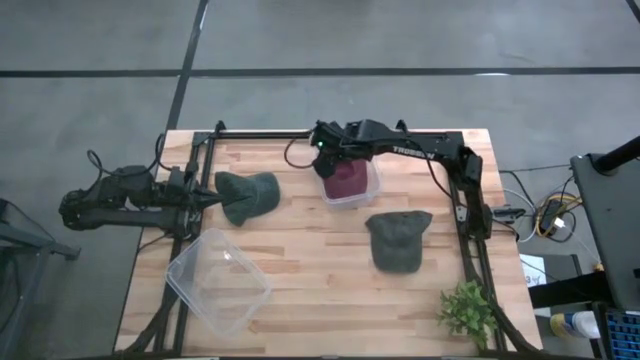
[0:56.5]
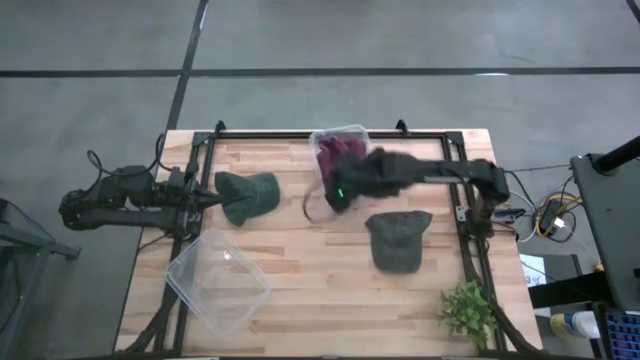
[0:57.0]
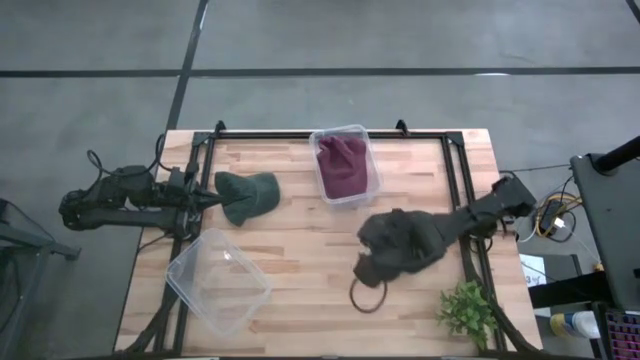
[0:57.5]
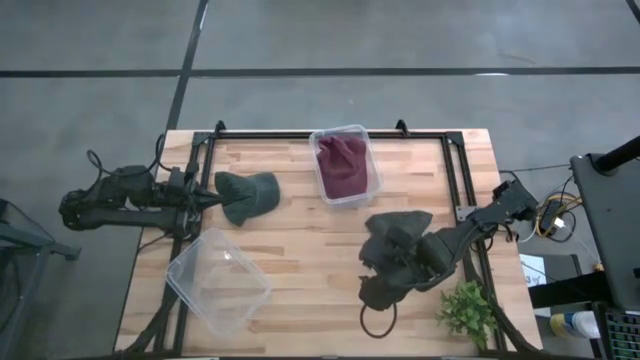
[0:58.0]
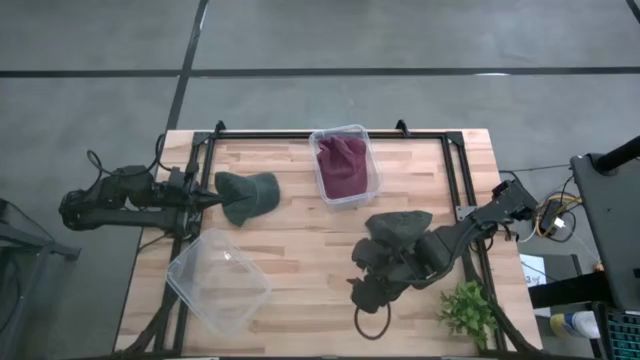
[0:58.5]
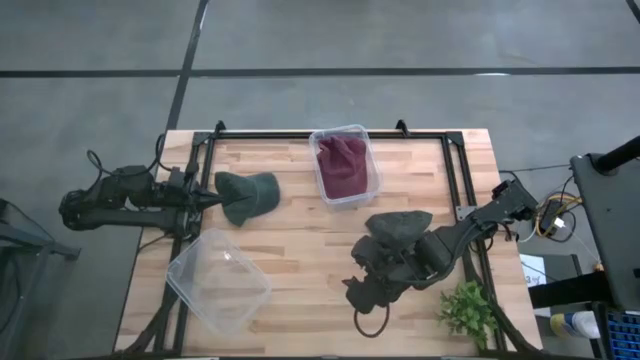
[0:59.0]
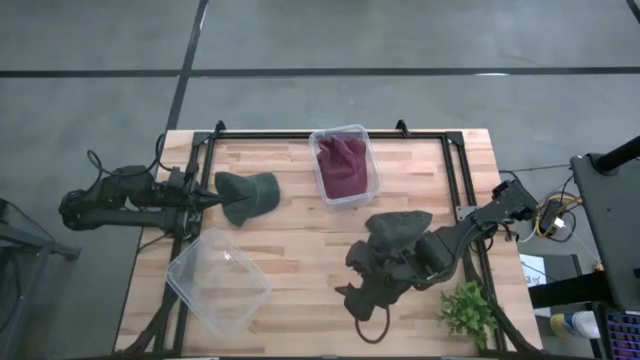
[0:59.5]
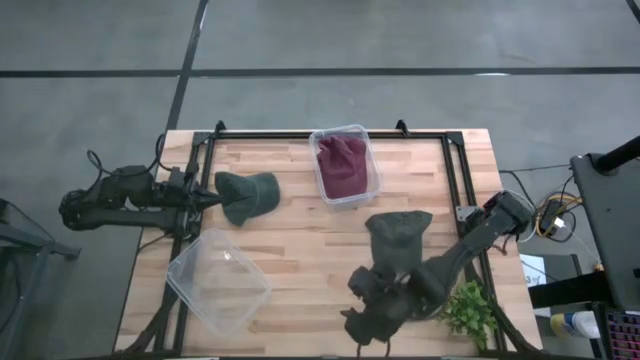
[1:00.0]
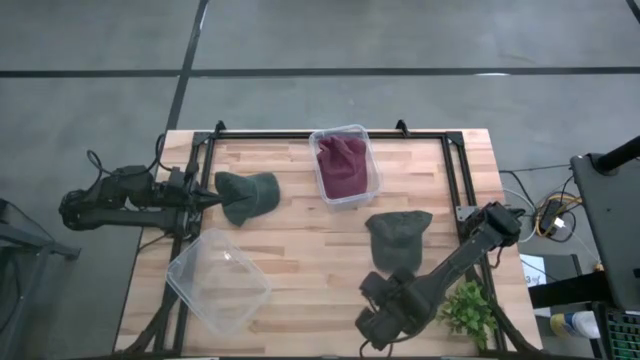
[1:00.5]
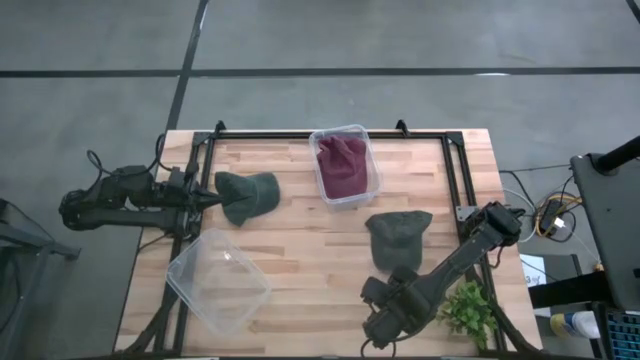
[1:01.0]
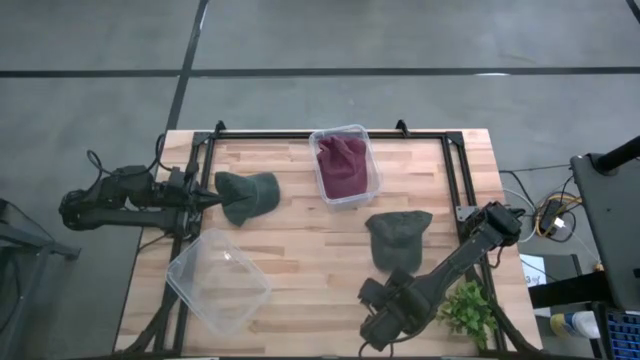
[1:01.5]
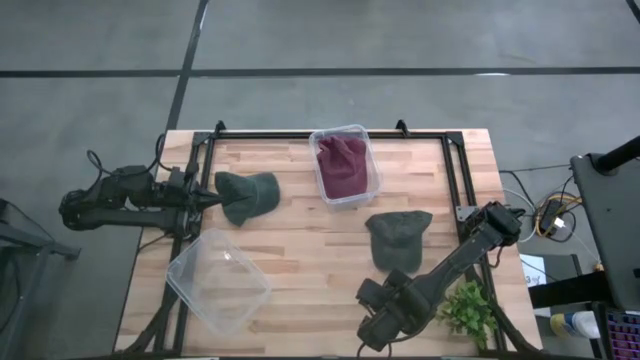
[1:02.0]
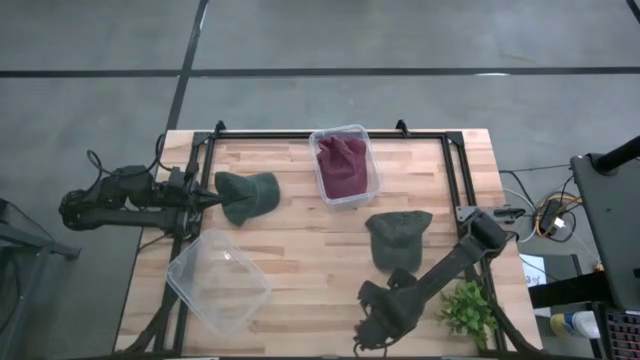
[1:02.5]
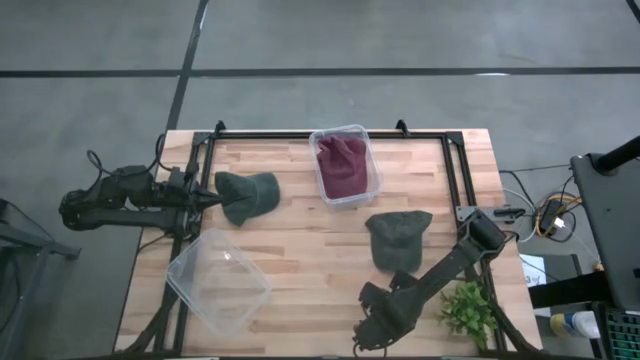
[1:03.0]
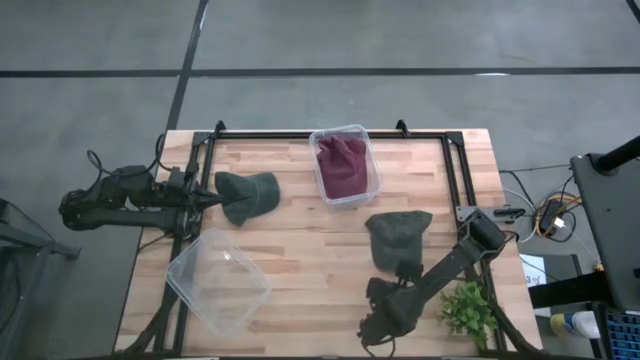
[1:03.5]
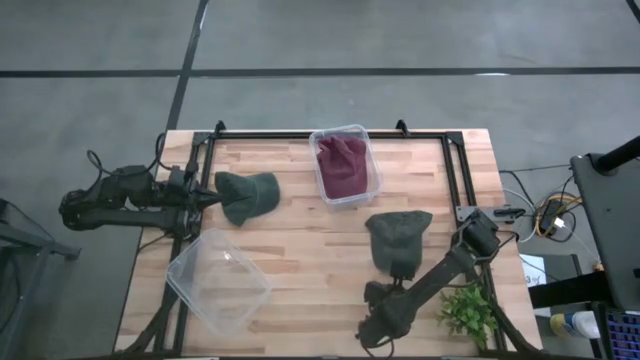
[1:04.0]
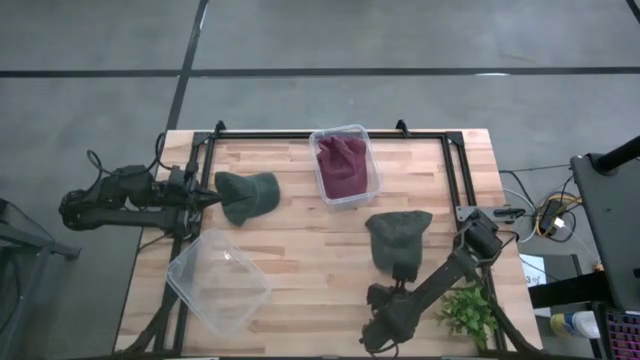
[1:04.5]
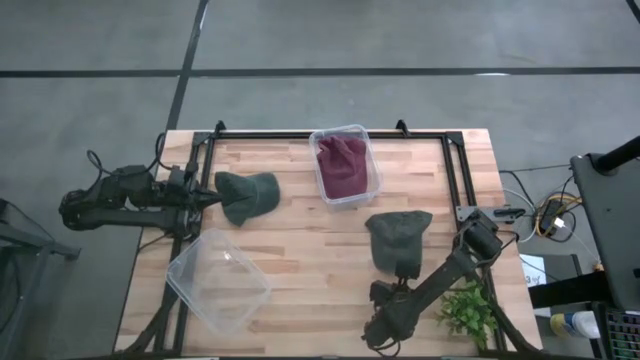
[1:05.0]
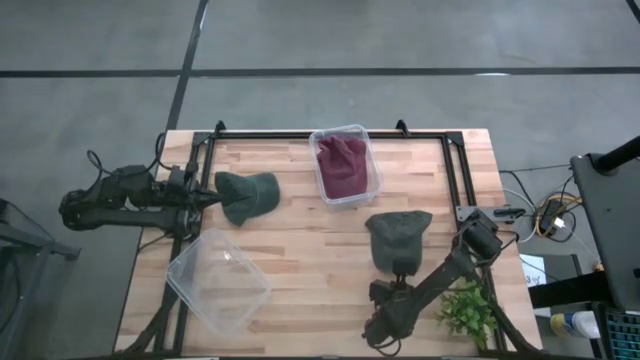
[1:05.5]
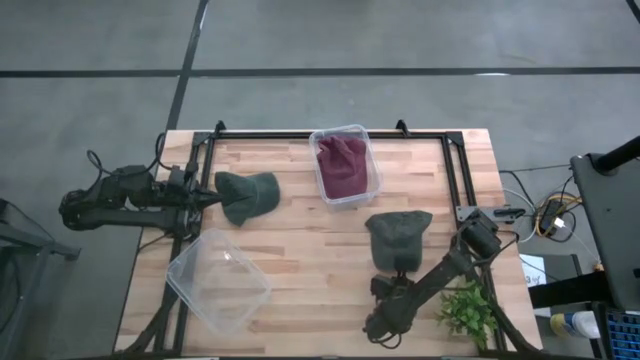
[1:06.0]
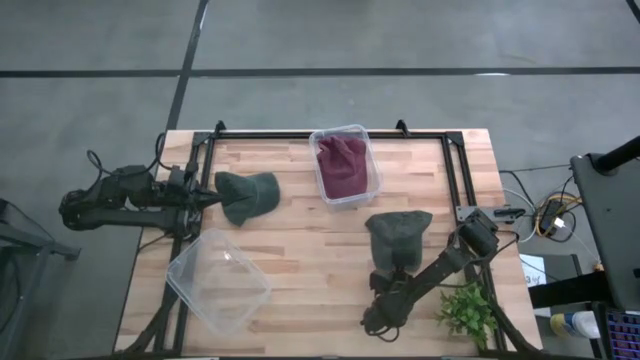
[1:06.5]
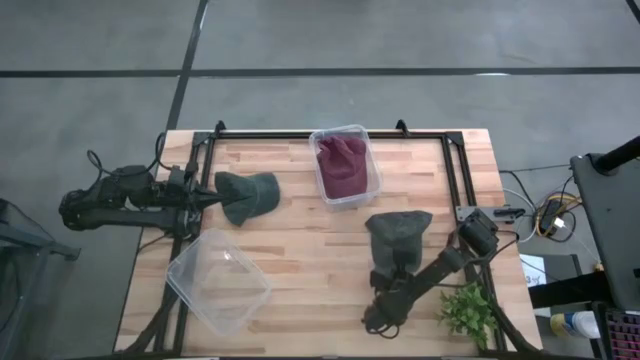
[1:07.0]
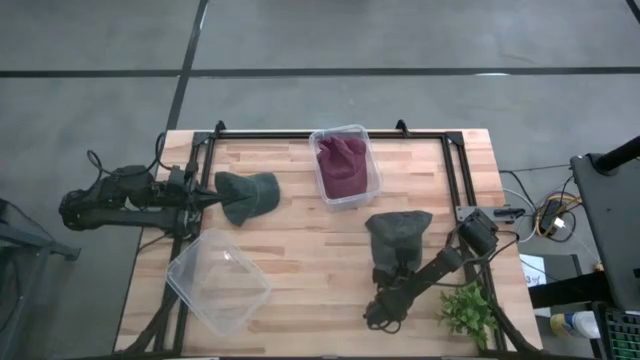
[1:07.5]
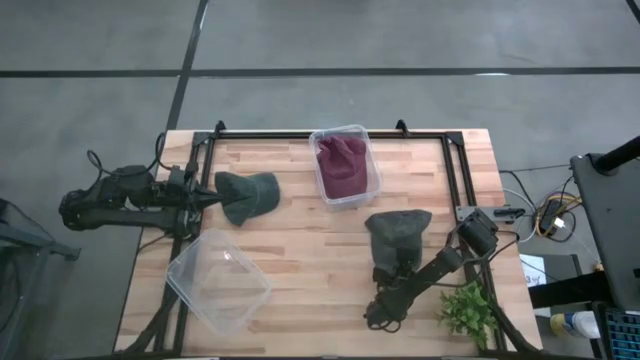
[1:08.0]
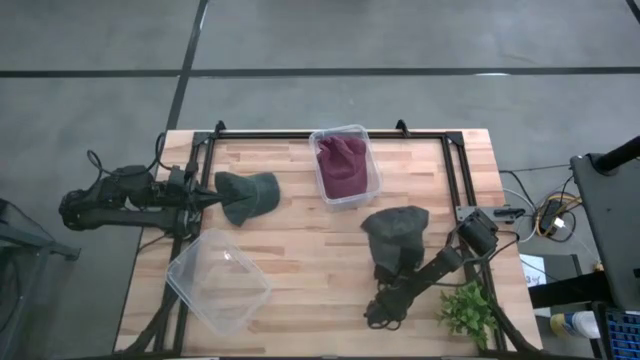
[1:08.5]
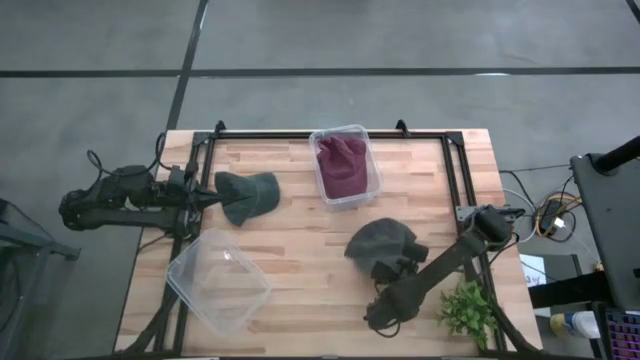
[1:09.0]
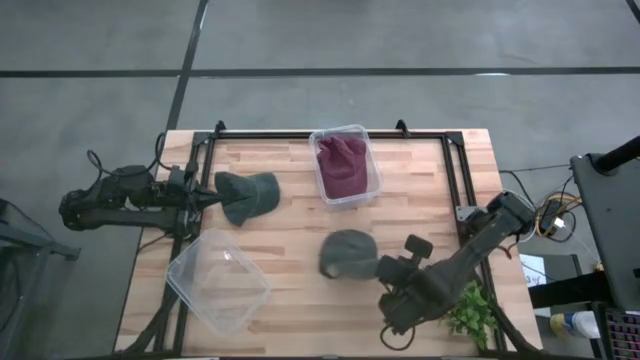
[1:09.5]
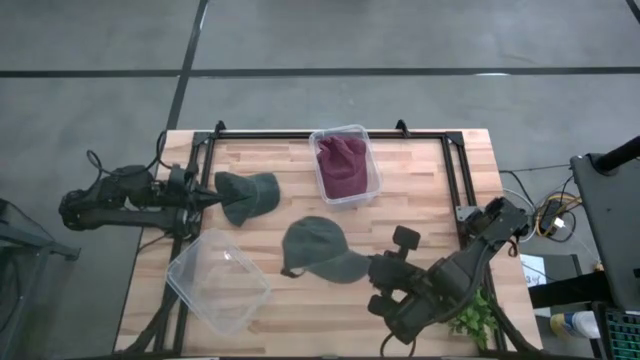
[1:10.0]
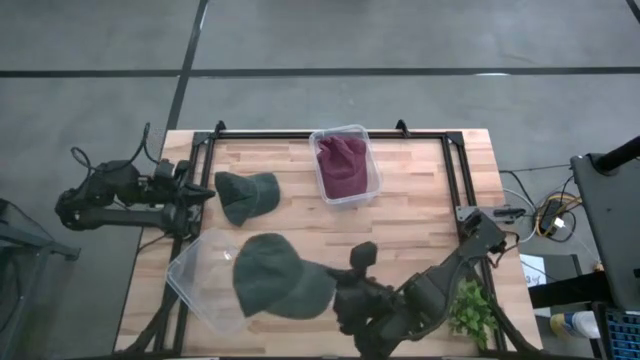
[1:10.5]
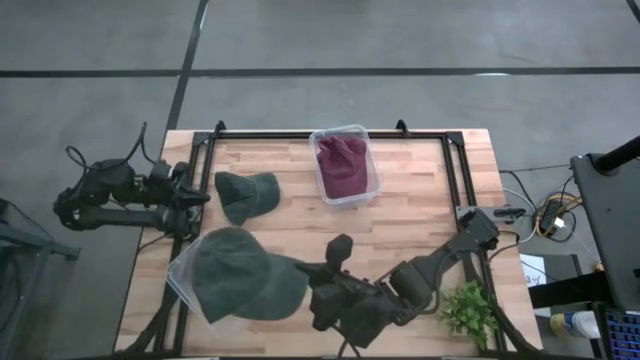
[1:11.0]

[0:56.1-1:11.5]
Task: Pick & Place hat
Put the green cap into the bottom transparent bin
